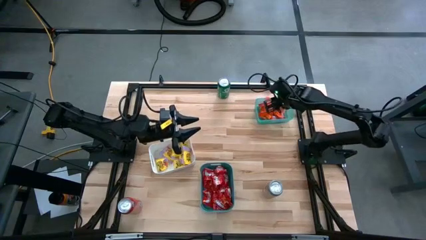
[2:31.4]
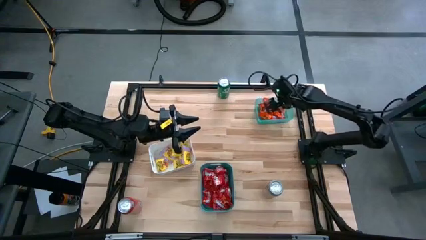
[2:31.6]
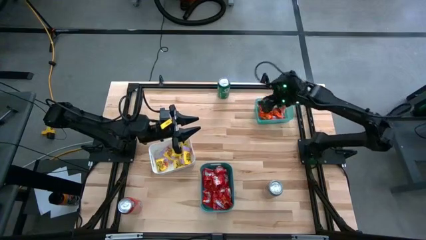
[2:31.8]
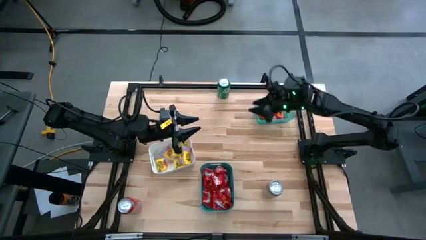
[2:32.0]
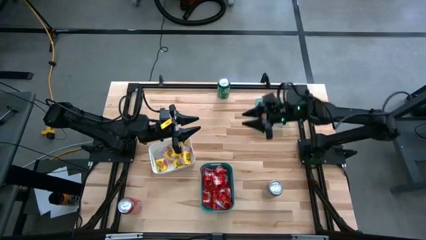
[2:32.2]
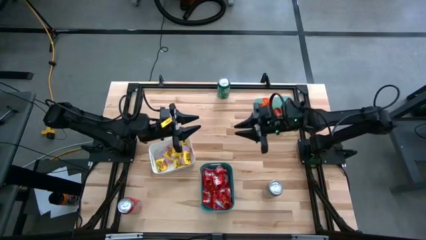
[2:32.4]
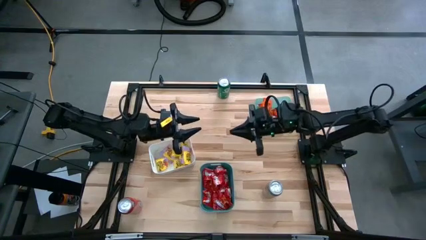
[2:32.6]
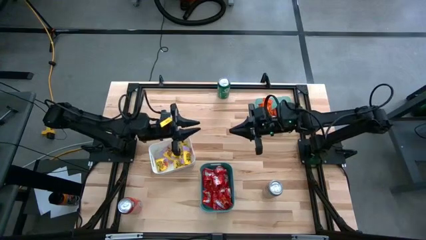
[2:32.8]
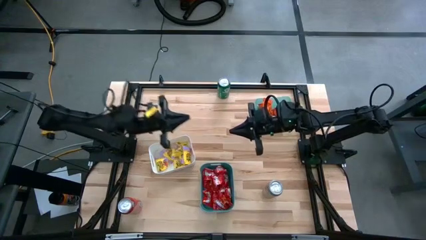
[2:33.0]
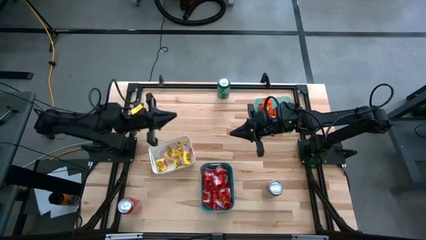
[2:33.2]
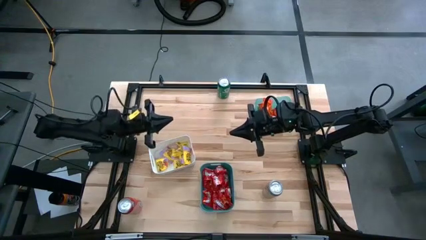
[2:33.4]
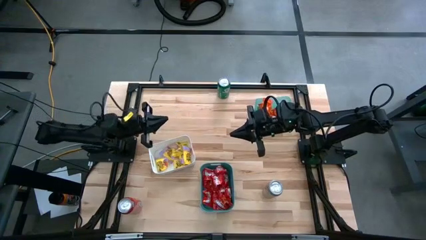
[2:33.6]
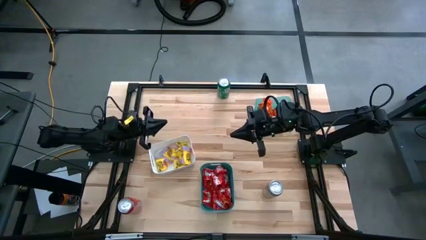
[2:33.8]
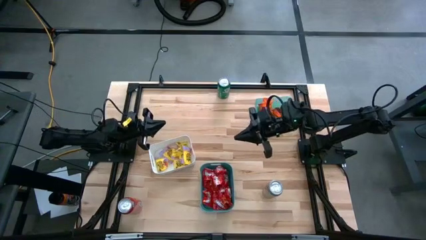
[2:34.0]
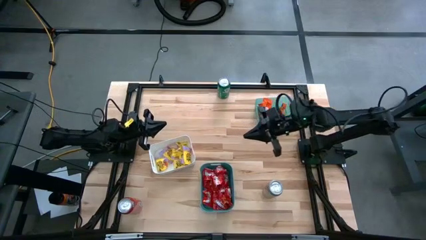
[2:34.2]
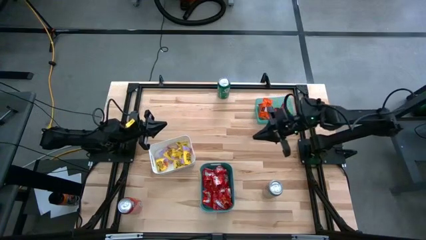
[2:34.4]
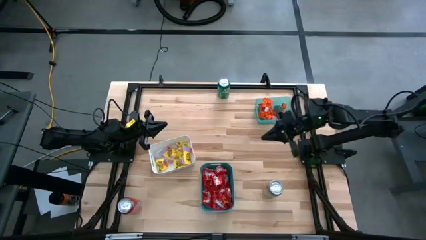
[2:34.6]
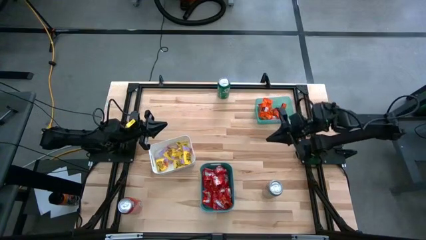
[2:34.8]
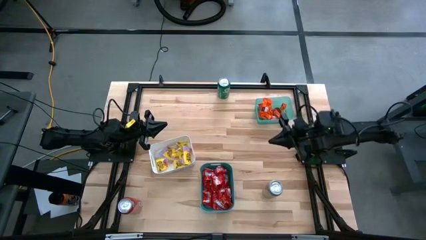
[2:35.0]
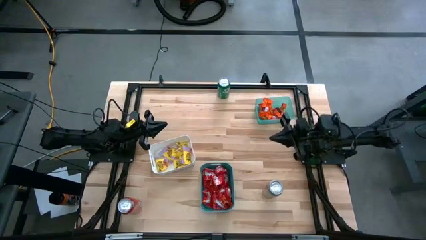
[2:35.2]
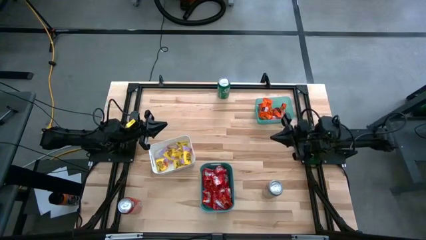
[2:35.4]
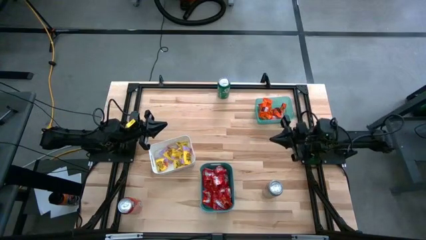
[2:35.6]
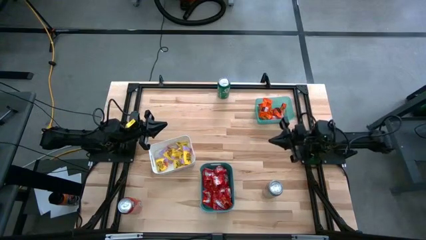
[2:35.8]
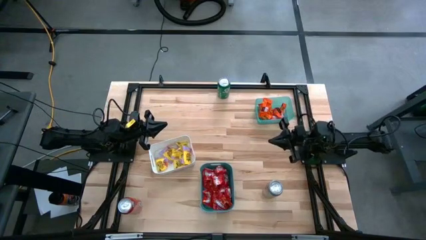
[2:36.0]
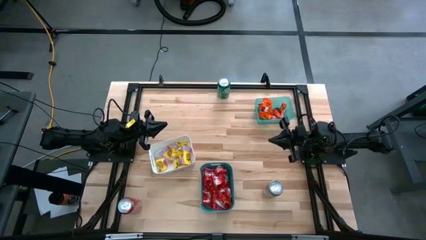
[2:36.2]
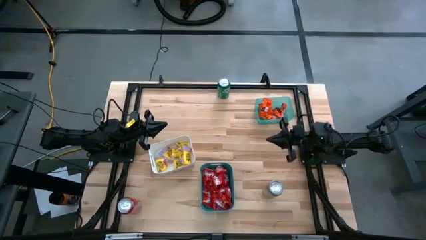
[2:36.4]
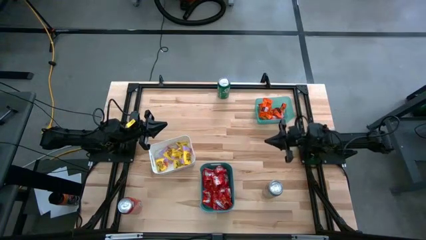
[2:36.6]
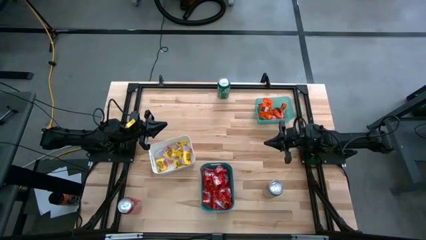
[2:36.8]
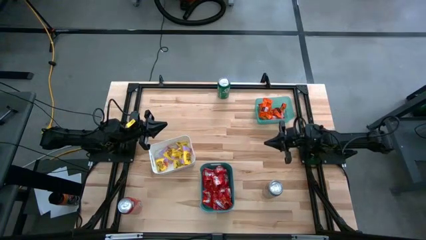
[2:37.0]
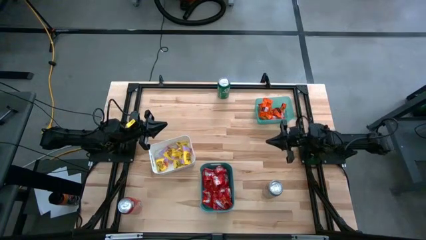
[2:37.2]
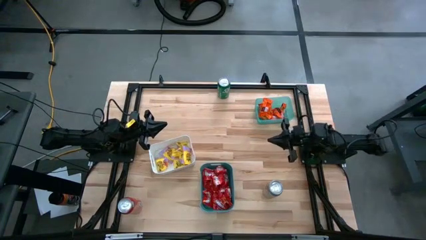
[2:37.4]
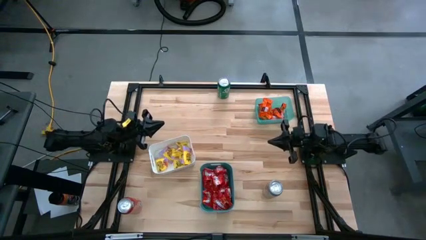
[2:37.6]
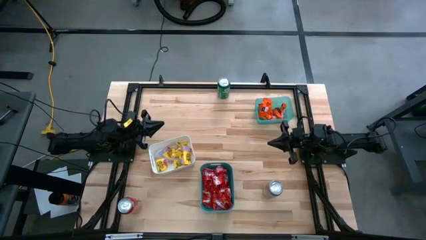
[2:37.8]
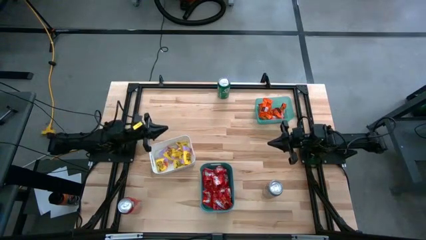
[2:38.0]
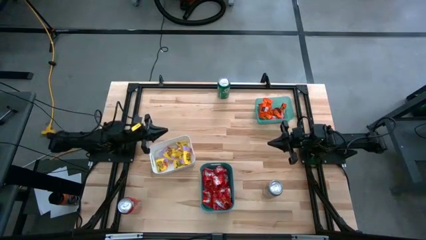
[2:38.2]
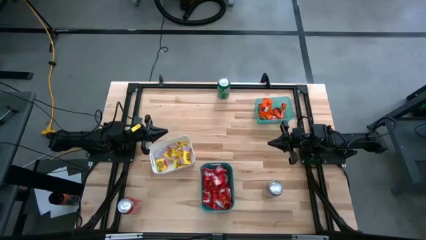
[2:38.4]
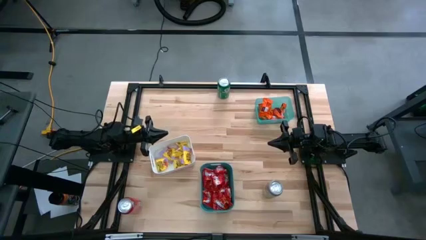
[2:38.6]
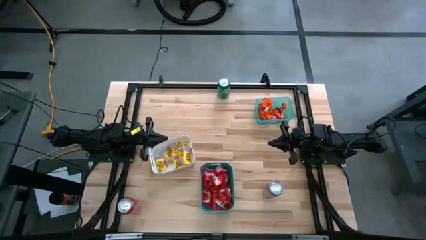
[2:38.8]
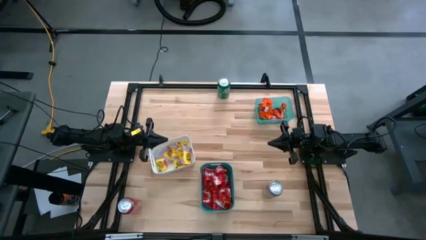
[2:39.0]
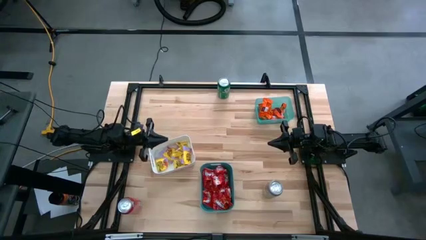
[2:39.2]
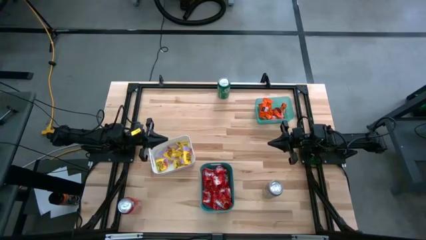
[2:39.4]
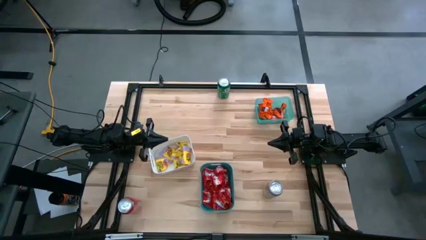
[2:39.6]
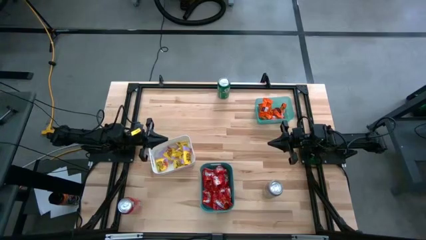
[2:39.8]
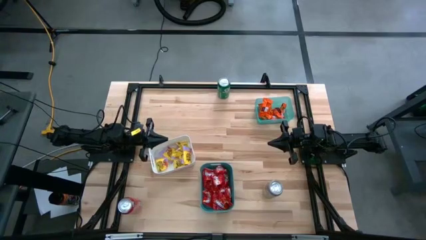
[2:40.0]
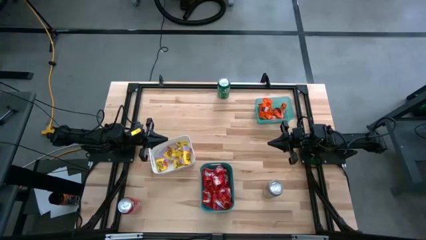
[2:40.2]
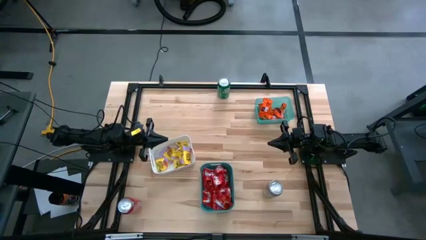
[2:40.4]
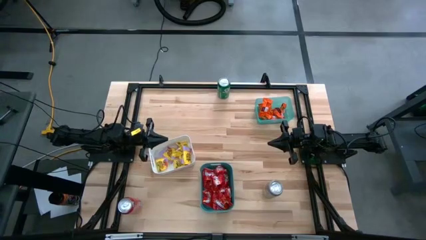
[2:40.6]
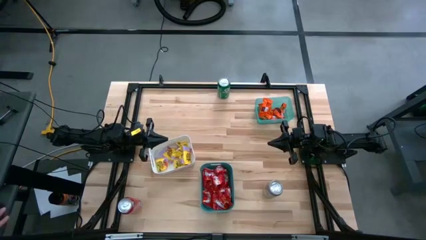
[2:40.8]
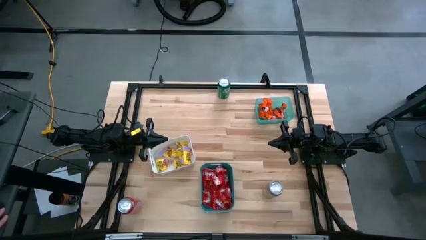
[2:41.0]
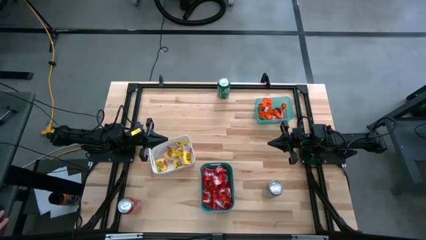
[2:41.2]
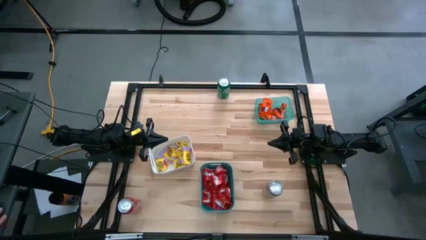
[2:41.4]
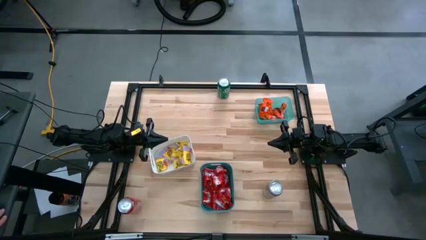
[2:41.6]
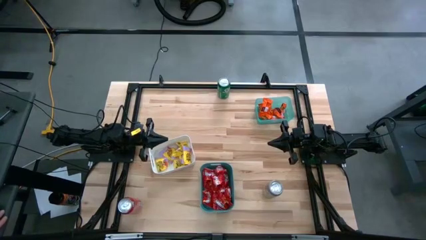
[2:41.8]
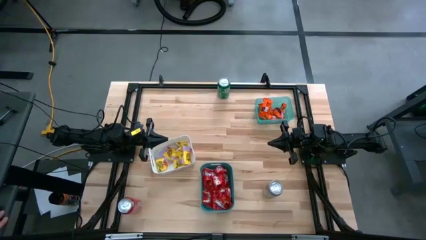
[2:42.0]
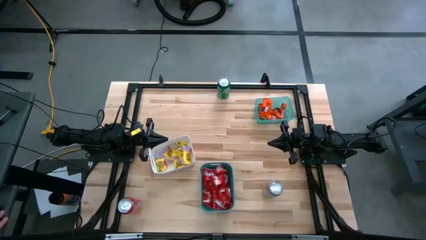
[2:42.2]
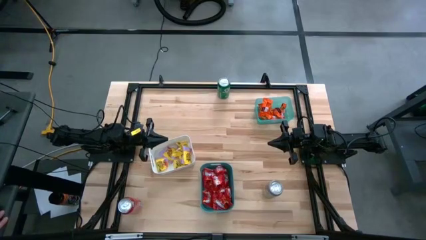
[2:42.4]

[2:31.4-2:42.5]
Task: Sort candy
Return to Home Position

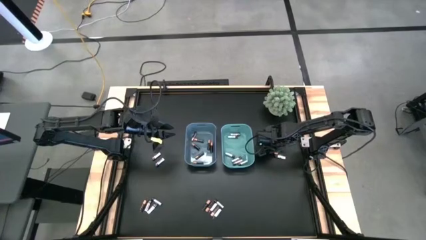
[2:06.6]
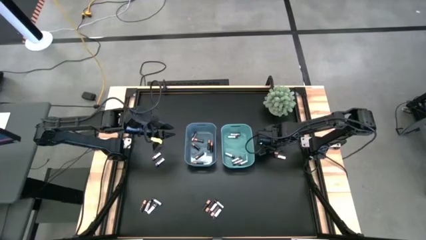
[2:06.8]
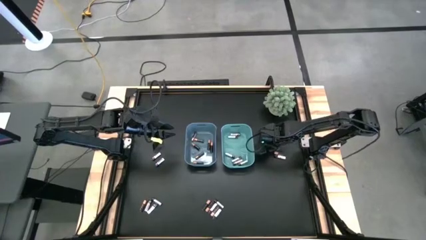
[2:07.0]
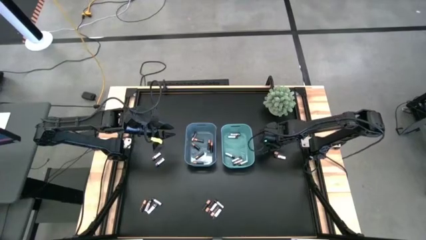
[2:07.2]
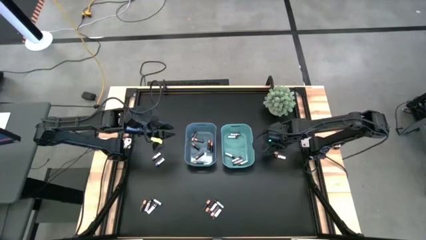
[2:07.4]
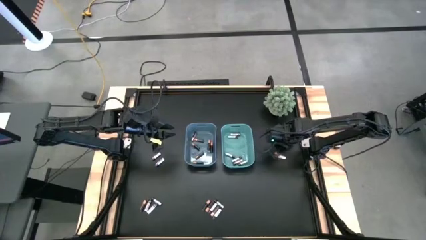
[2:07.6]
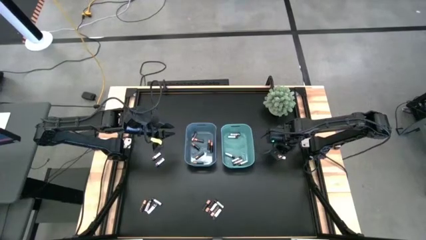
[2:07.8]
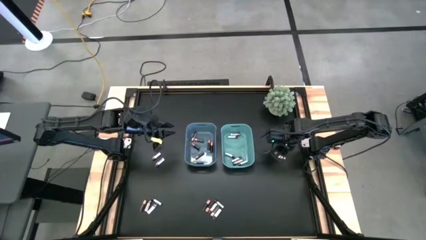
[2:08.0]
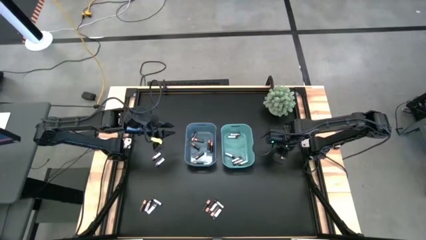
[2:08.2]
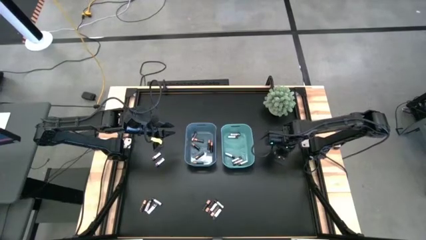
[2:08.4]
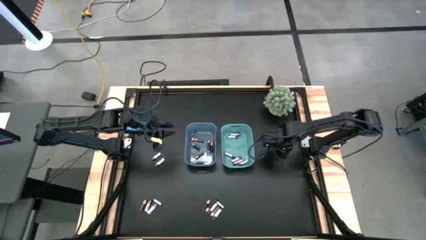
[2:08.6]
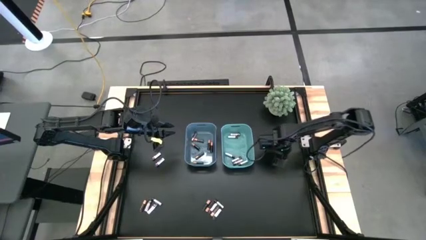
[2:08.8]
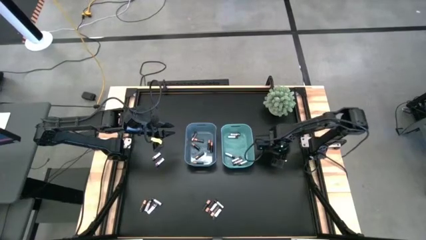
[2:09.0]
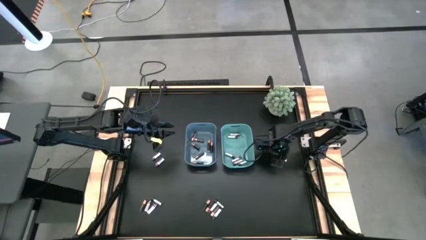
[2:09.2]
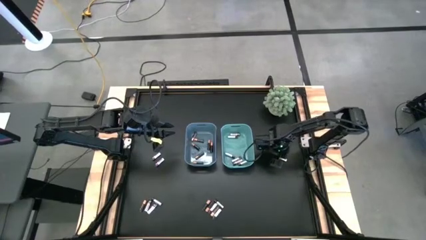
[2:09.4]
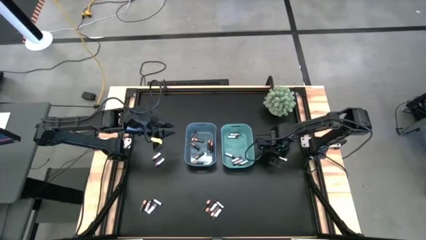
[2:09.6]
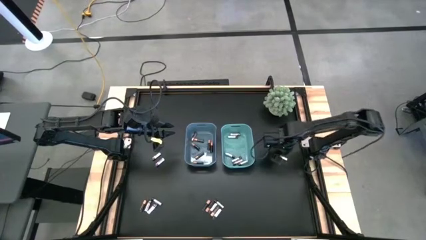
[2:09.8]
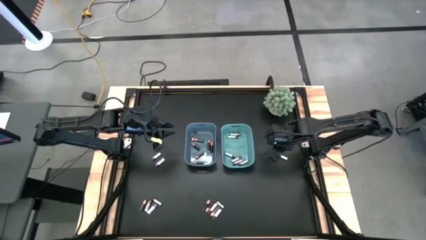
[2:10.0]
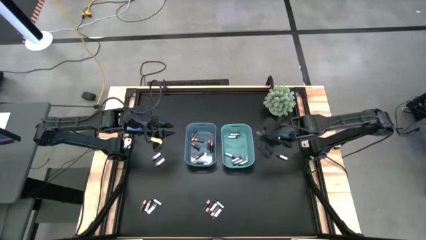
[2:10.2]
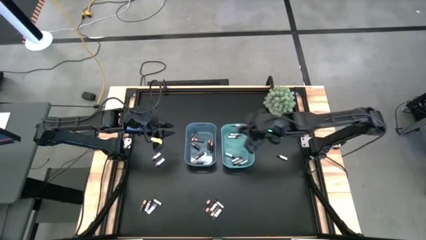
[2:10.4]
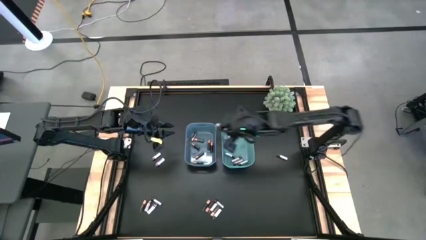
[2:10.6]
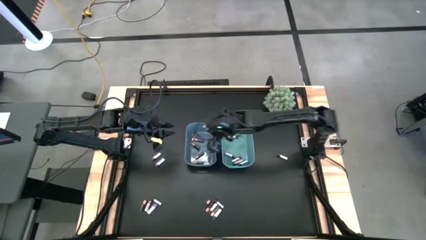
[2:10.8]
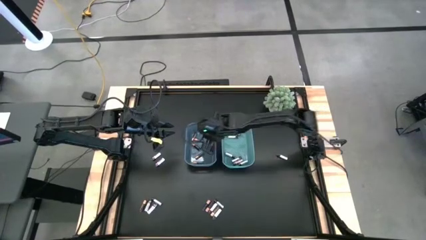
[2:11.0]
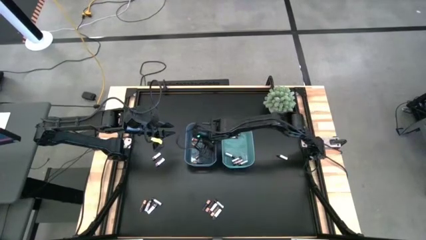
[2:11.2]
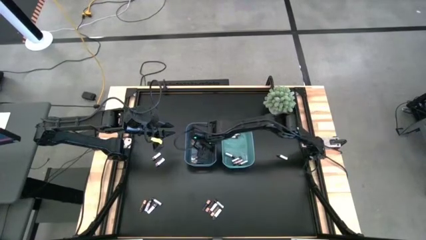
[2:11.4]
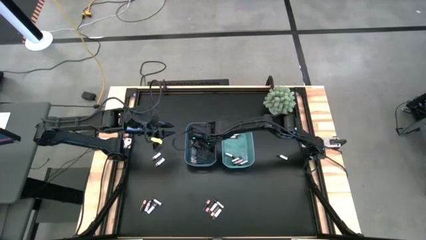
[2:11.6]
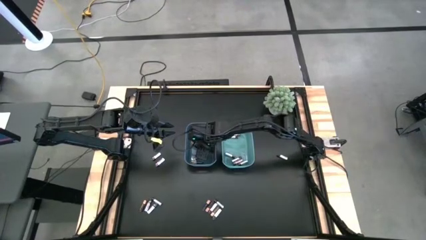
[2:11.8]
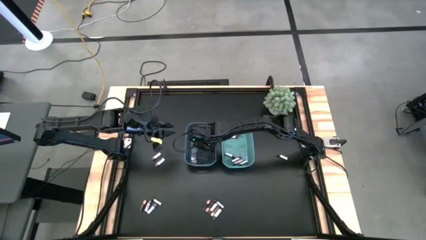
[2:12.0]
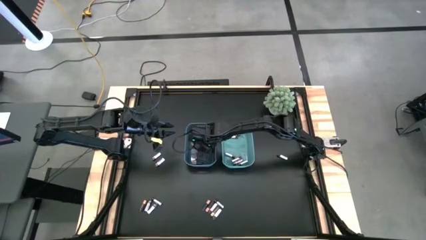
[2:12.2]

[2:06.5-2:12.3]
Task: Sort batteries
Put the black battery into the blue bin
